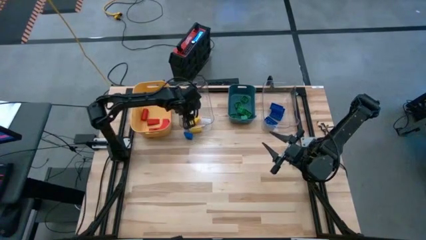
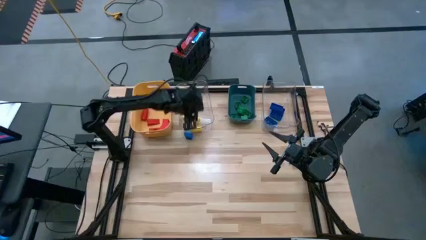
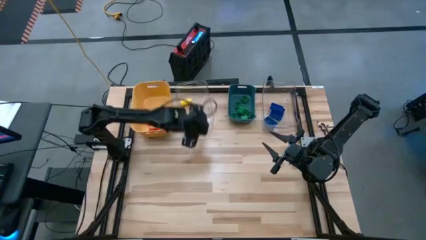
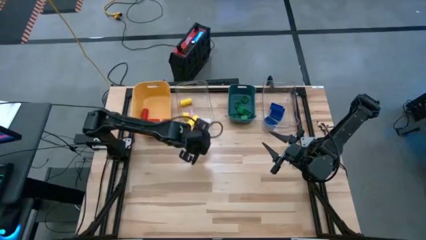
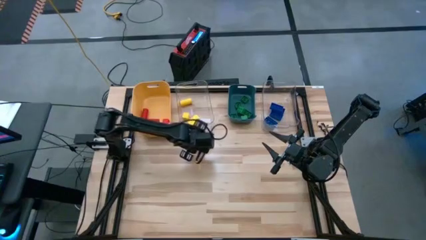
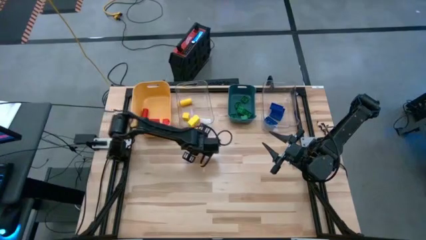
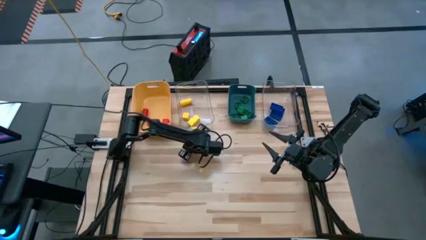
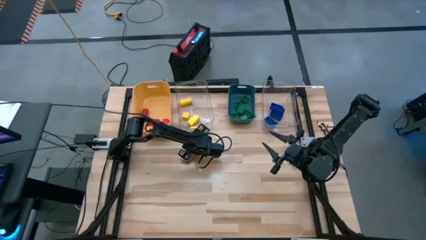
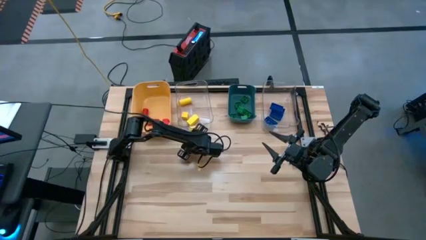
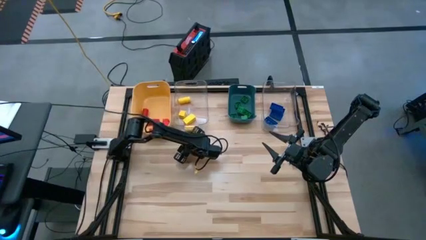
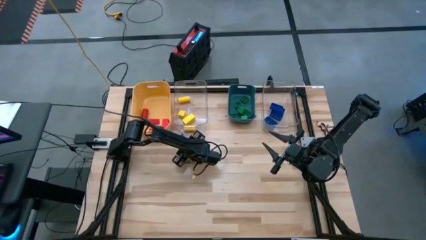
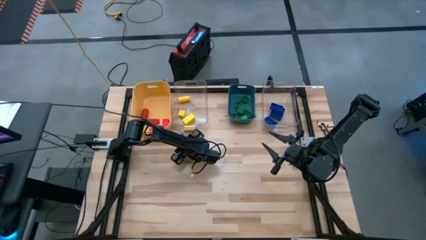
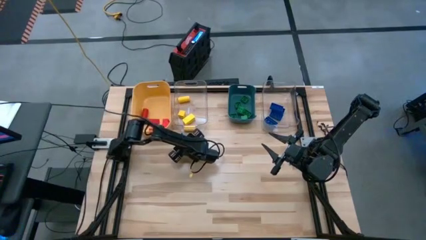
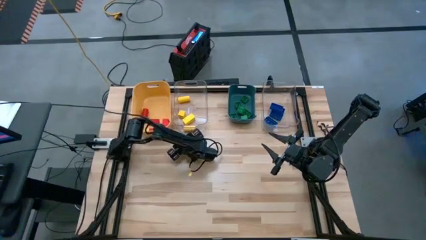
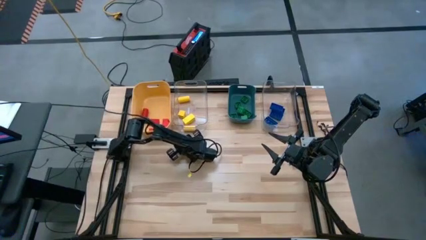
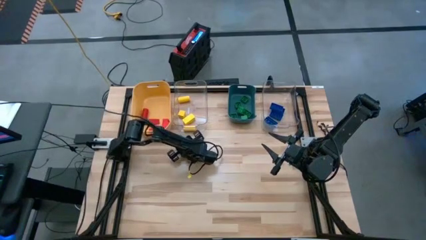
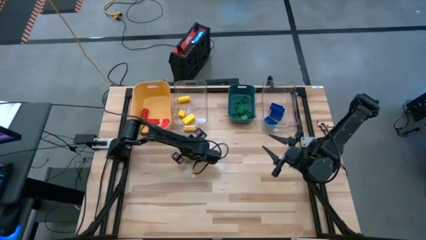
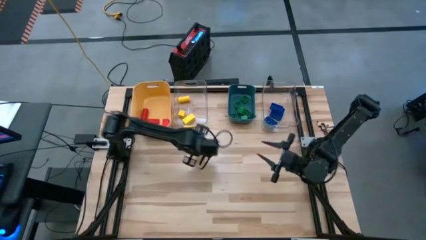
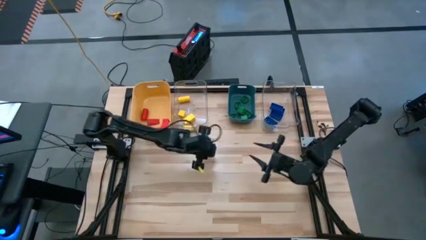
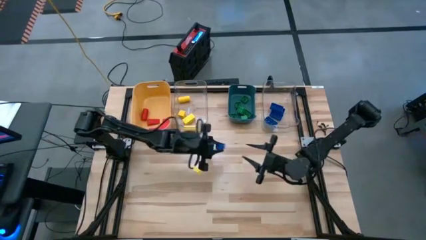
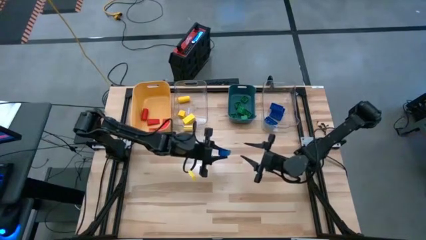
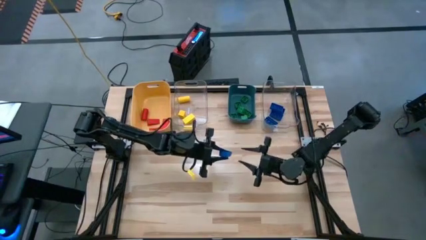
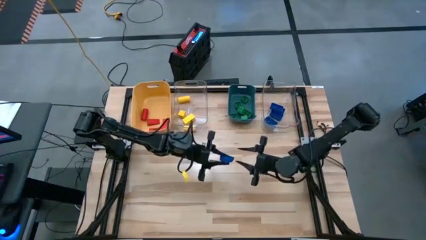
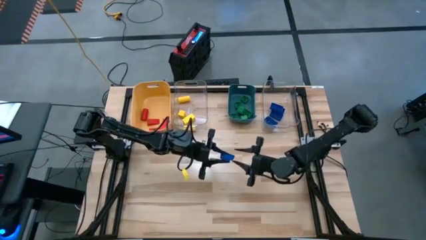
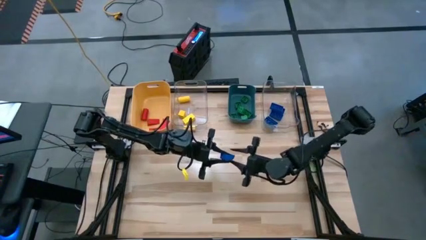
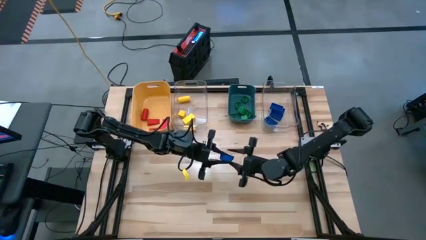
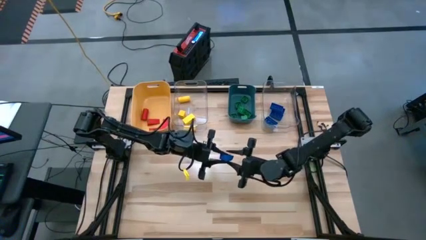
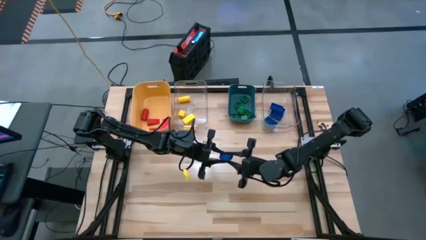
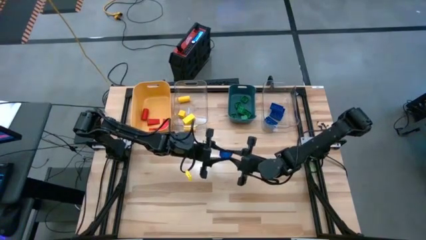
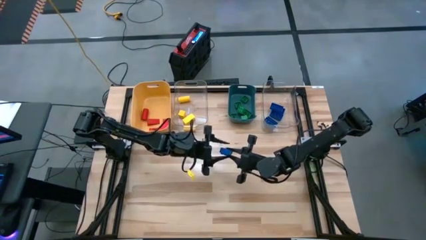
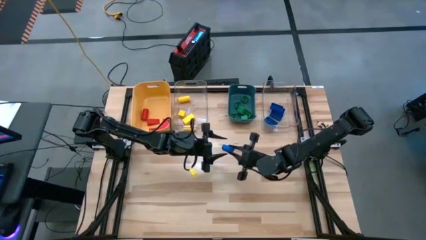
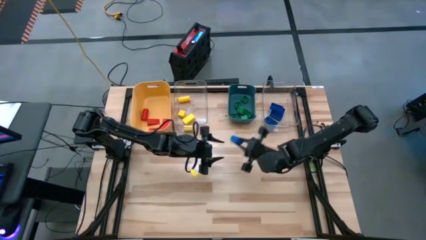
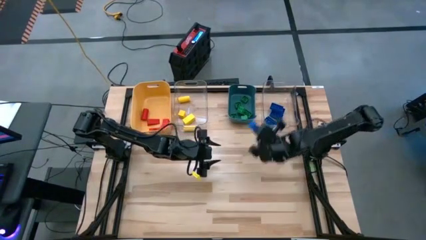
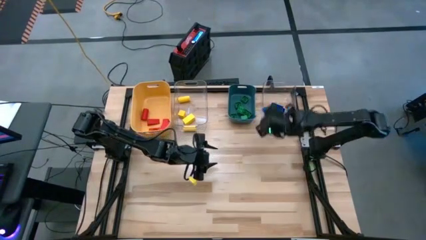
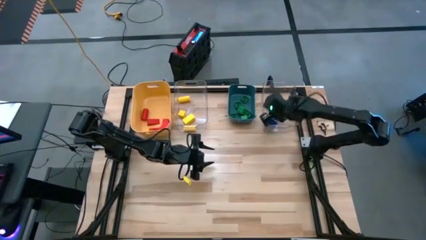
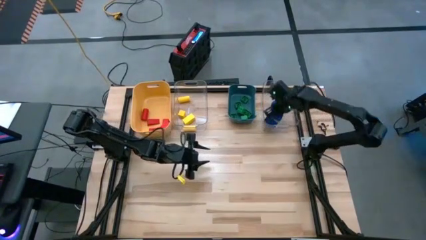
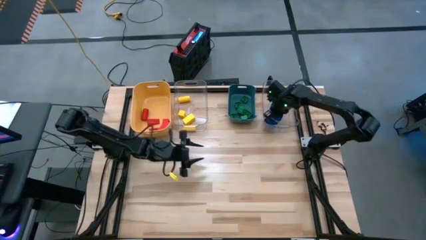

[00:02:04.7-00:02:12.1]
Task: Sort blocks
Put the blue game piece into the right transparent bin

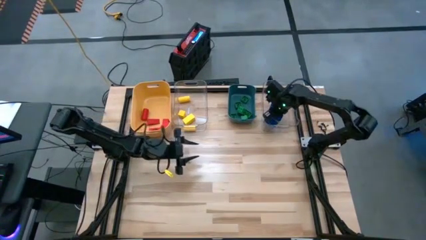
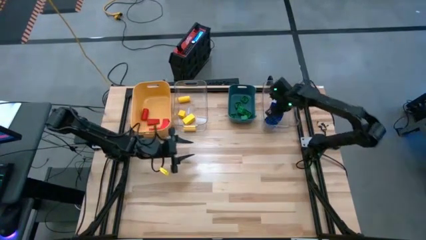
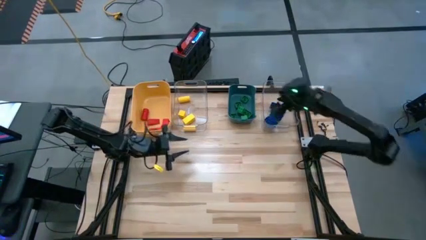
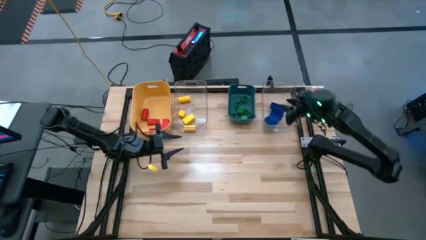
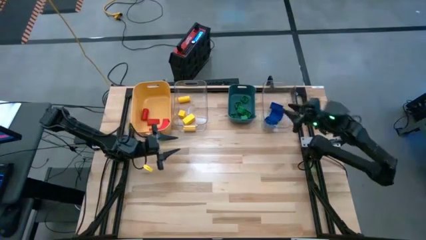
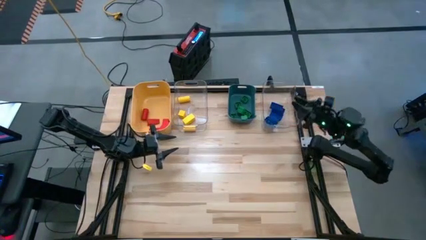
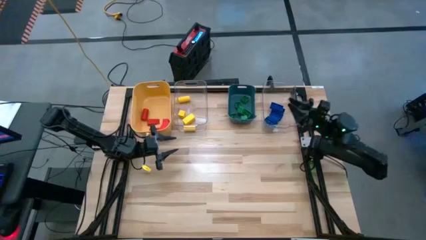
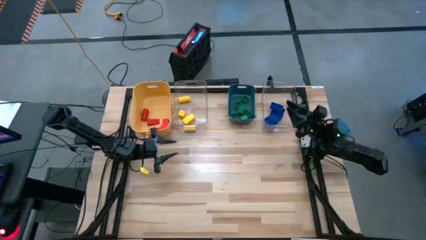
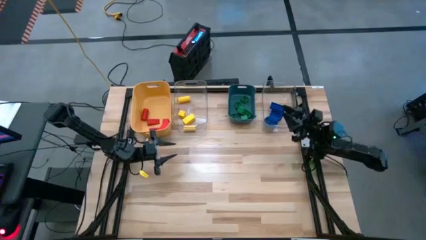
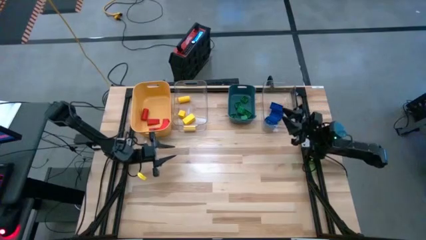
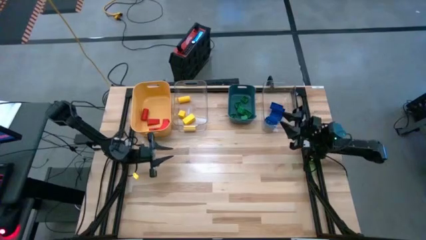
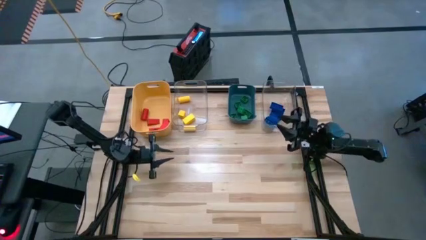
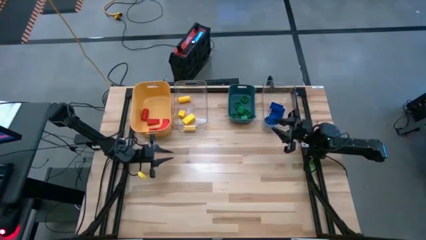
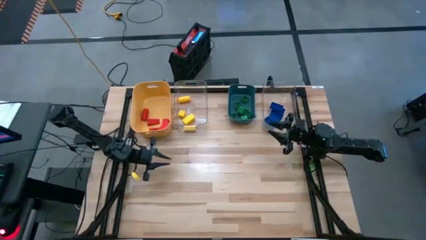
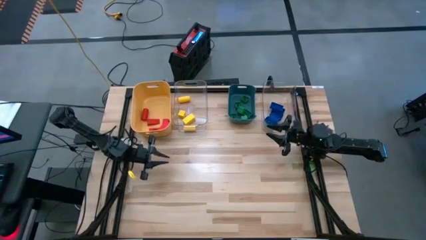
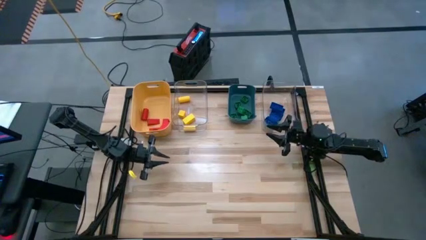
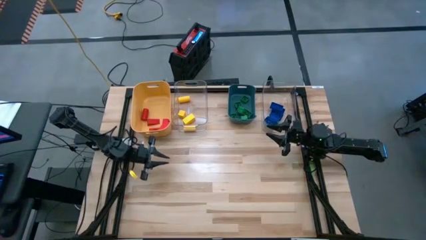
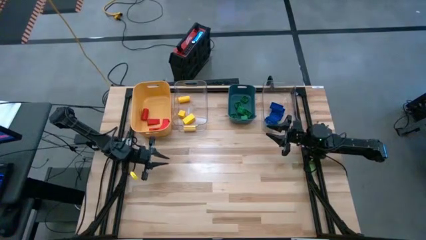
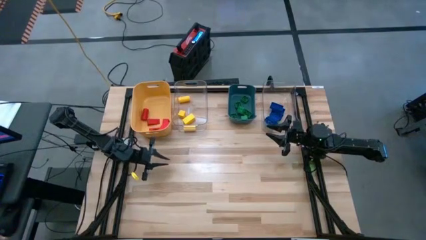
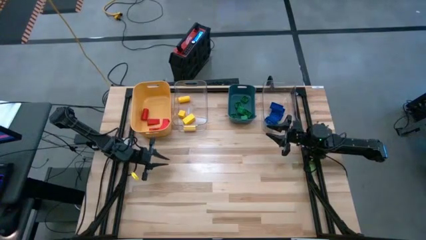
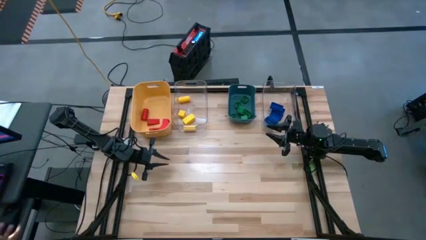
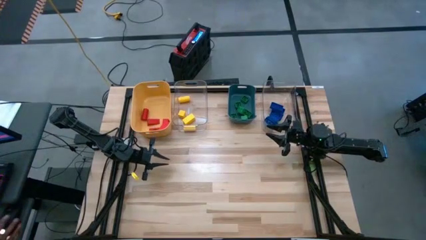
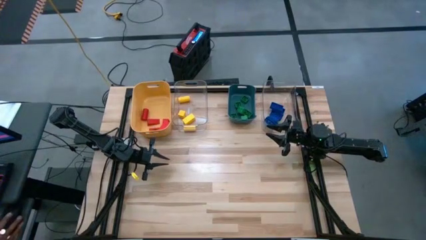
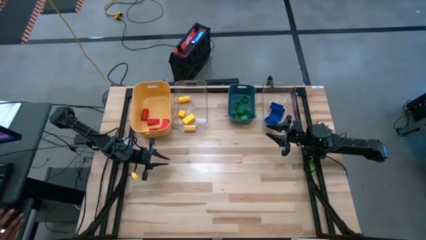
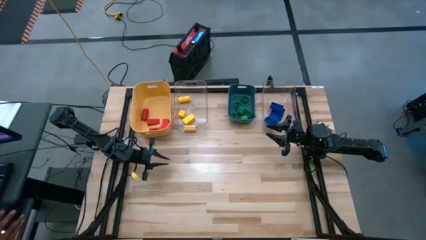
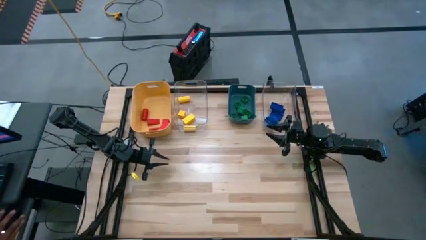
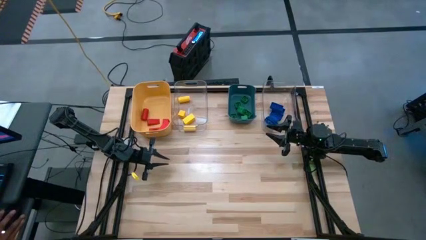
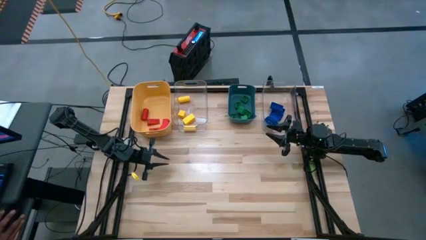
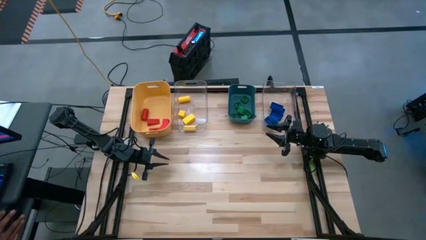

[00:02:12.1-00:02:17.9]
Return to Home Position

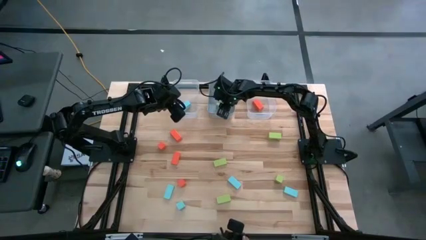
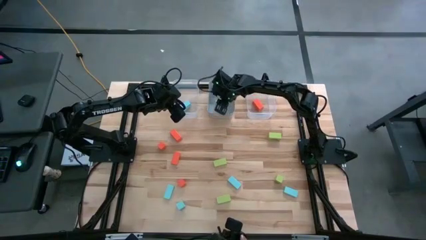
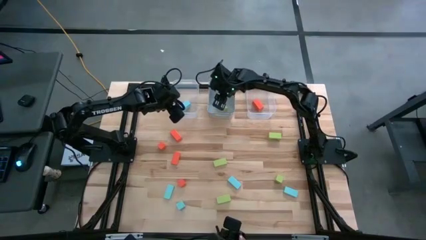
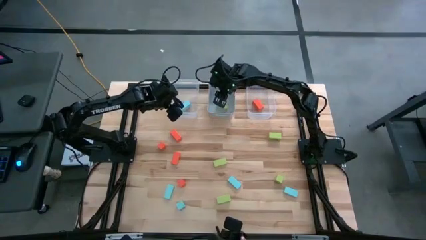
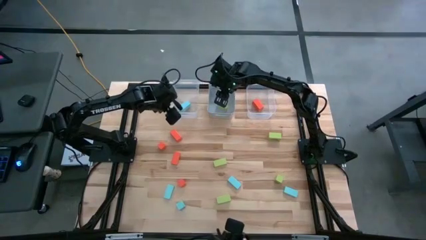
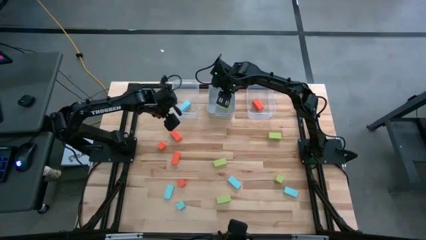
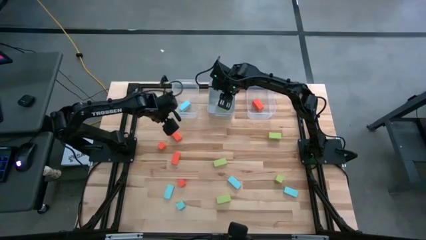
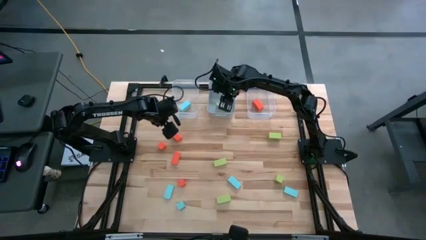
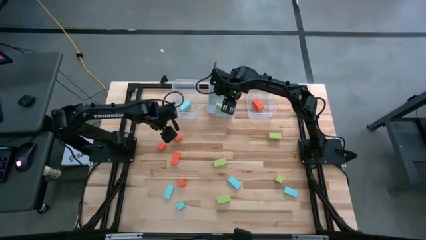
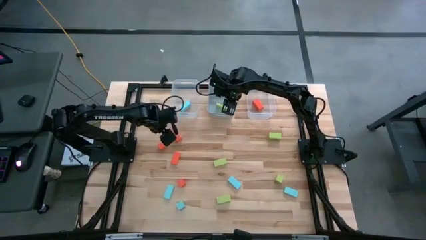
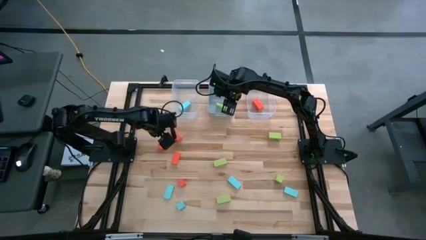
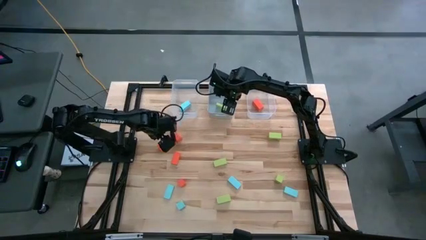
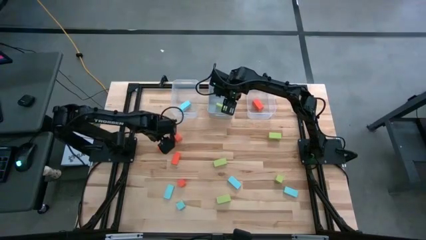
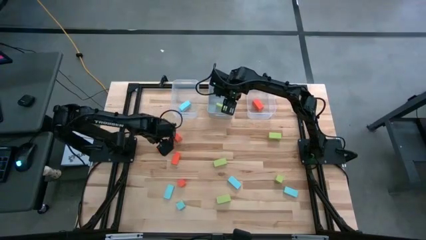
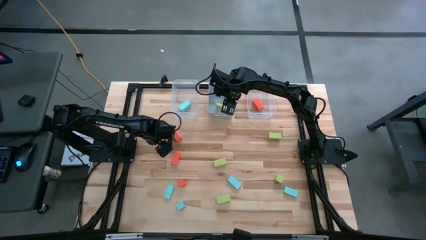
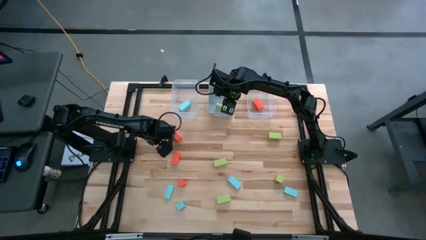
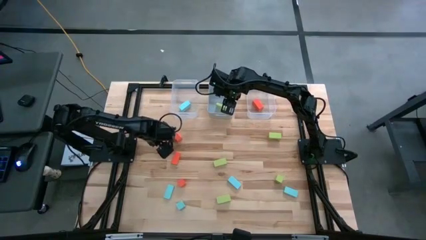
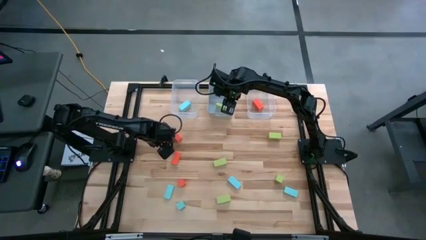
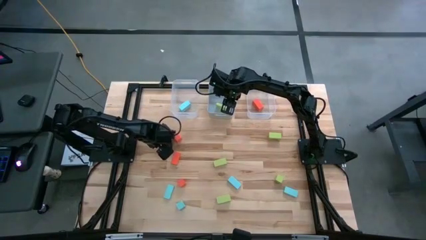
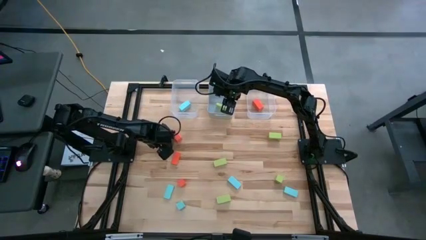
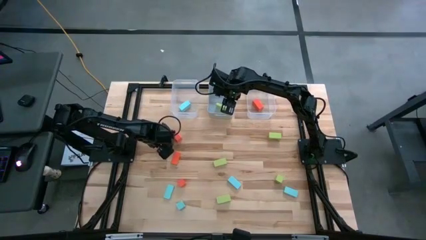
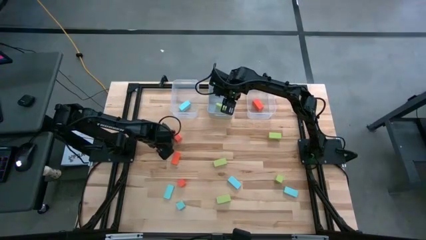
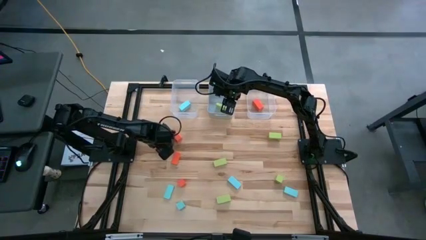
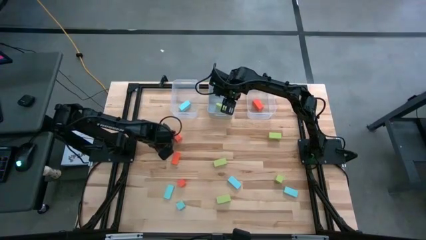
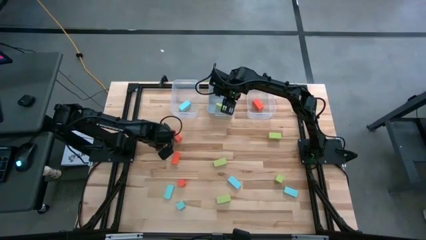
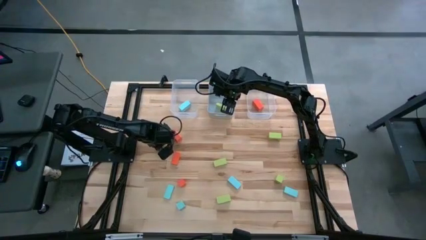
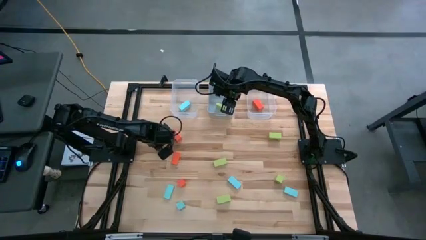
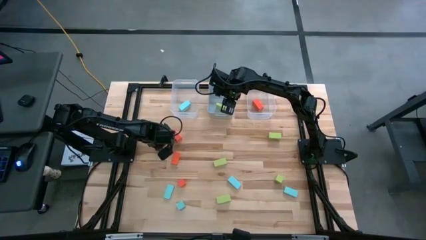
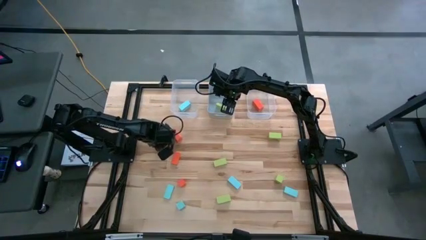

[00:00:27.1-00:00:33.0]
Task: Sort & place blocks by color
Put the orange block into the right transparent bin
